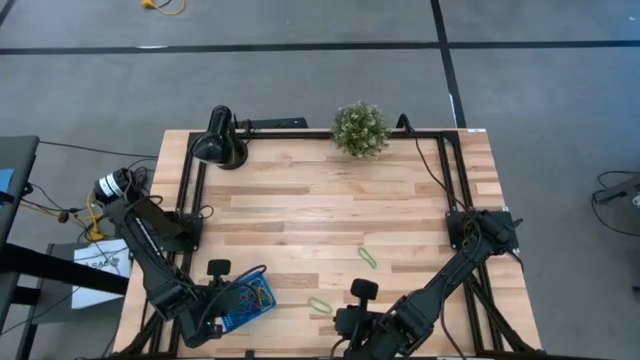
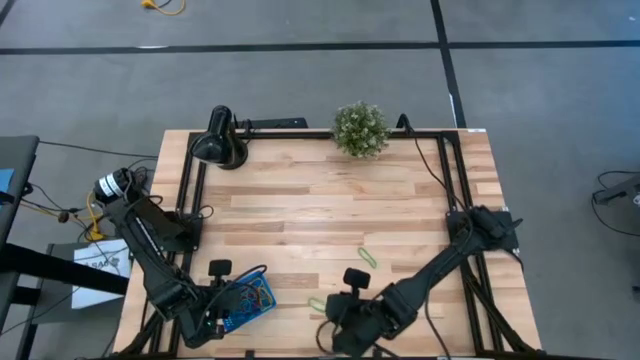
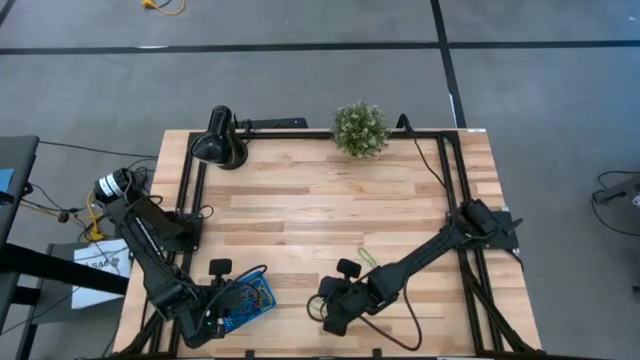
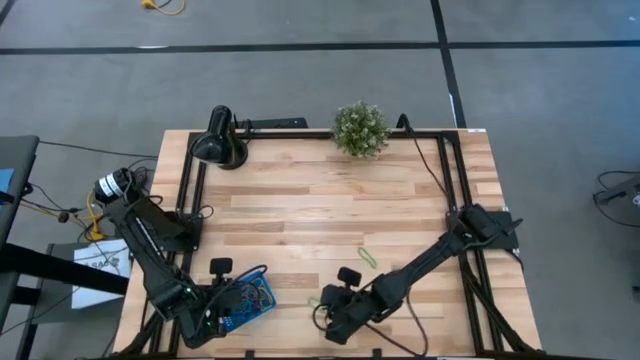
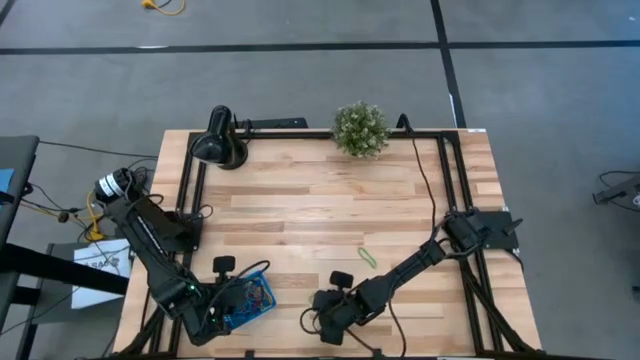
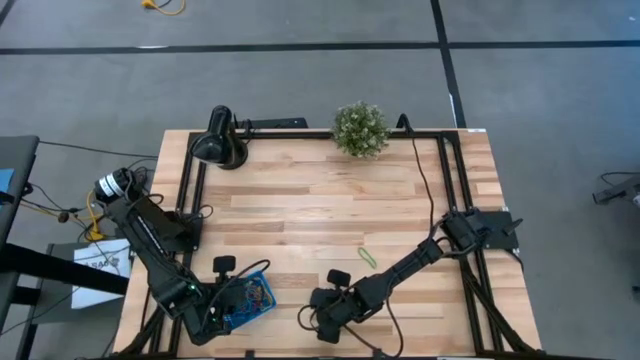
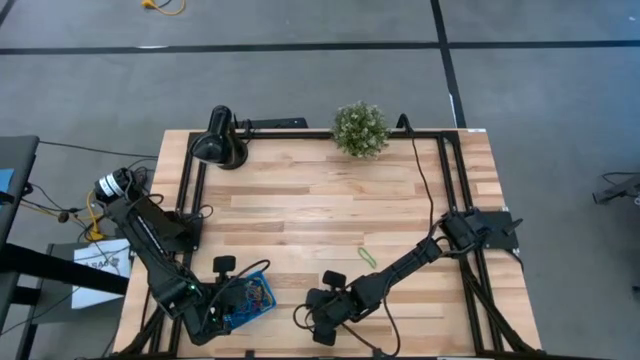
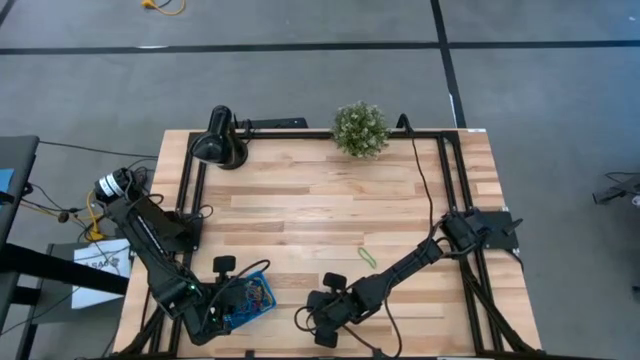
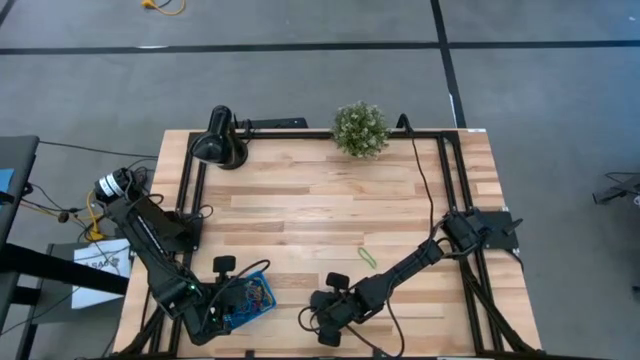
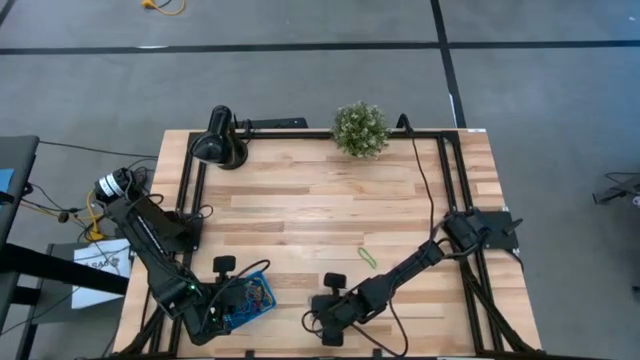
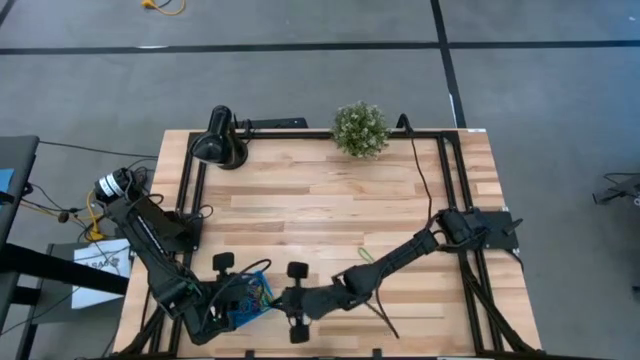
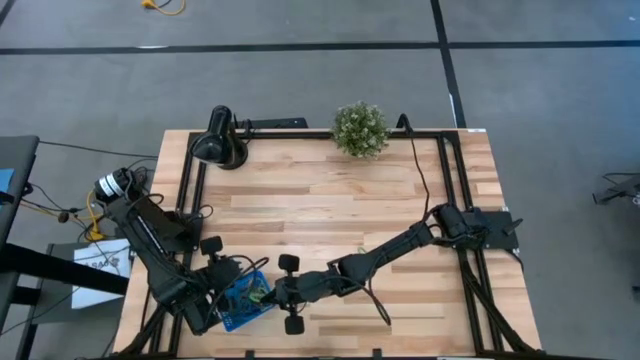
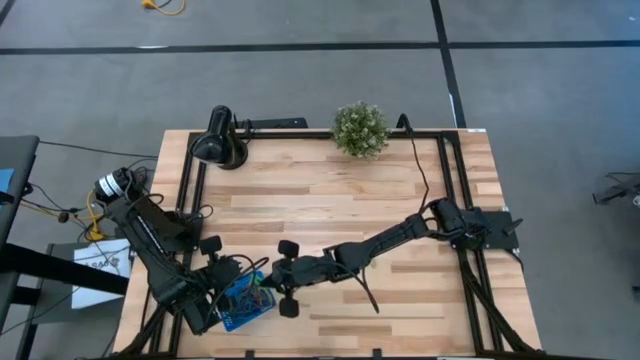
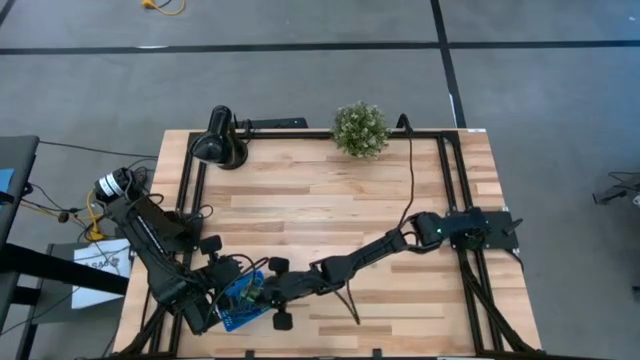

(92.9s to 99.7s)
Task: Pick and place rubber bands into bin
Put the bottom green rubber band into the blue basket

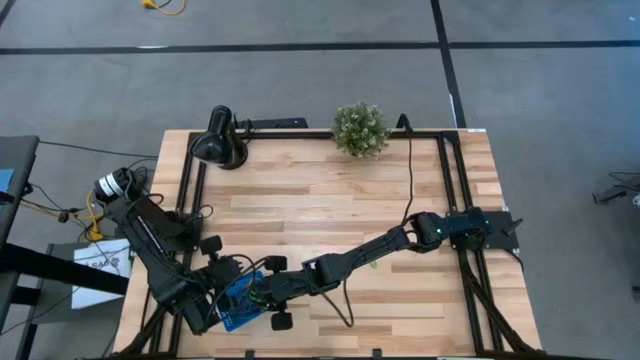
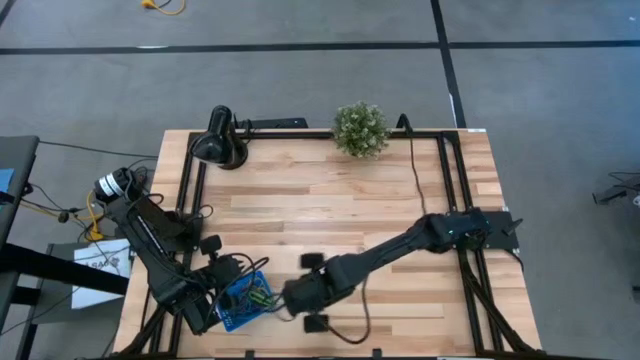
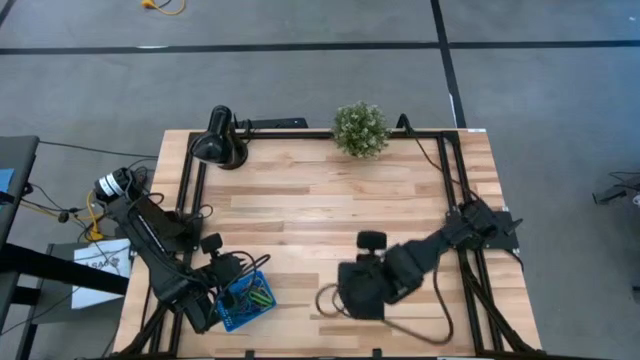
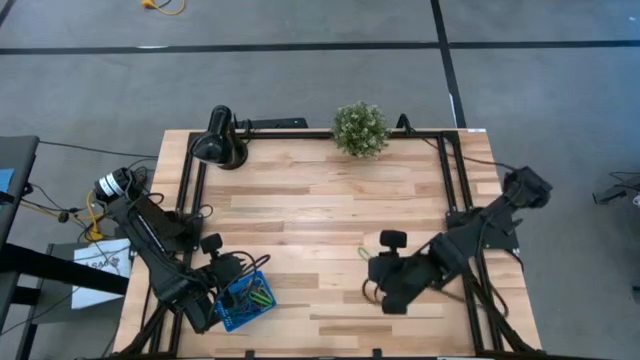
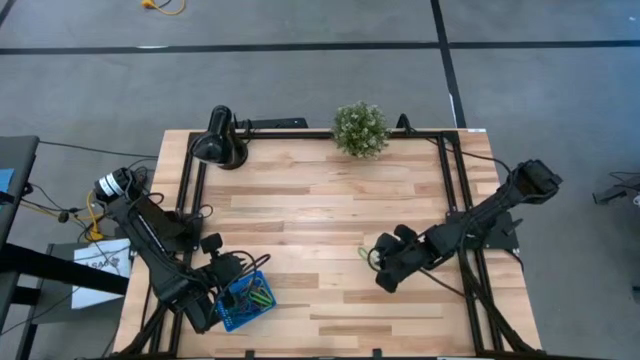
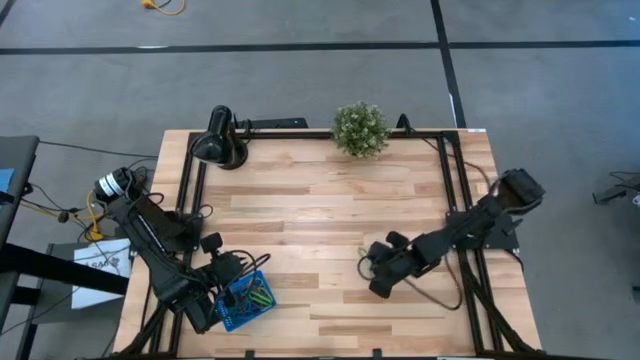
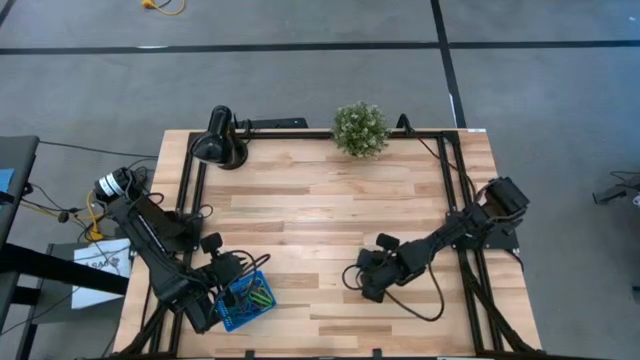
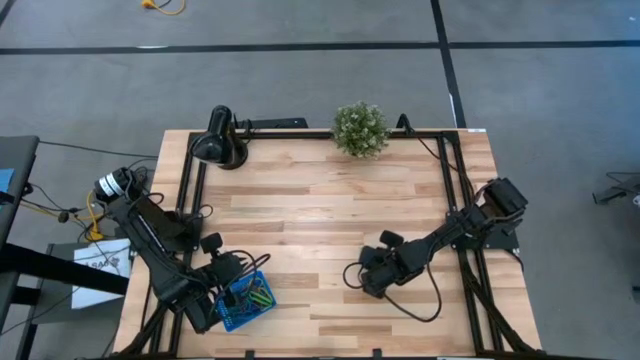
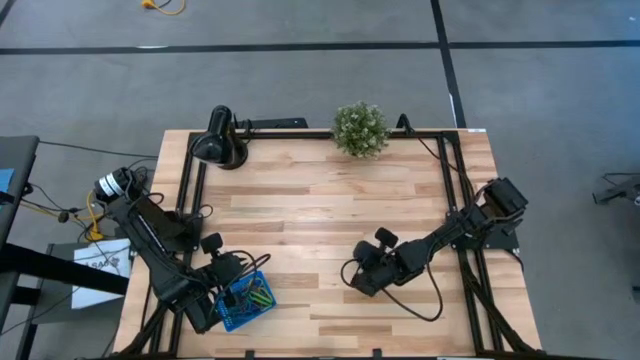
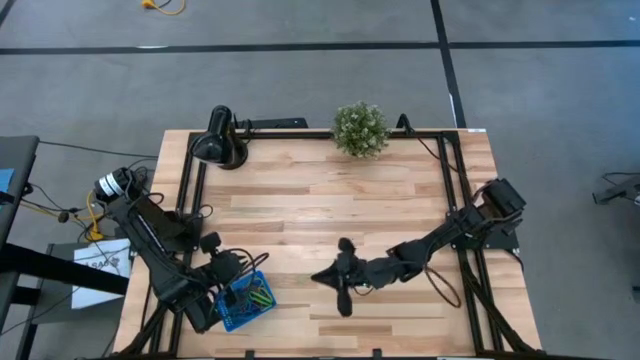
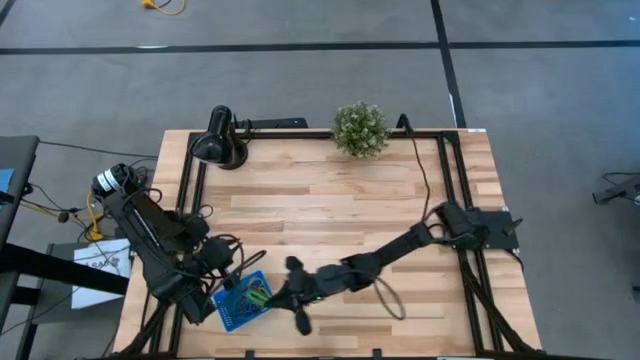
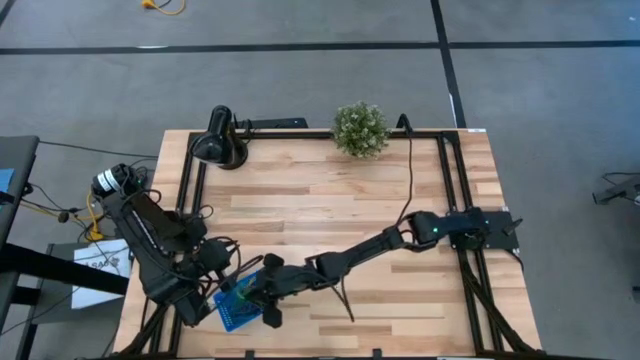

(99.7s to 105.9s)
Put the green rubber band into the blue basket

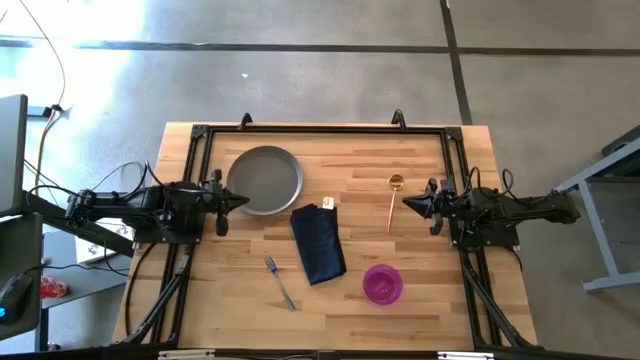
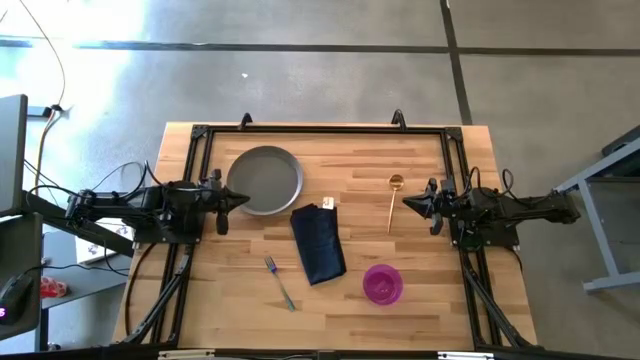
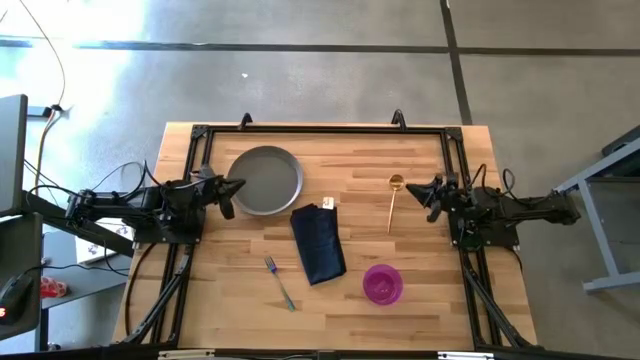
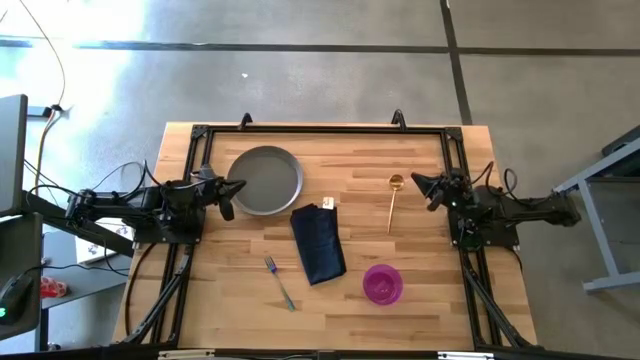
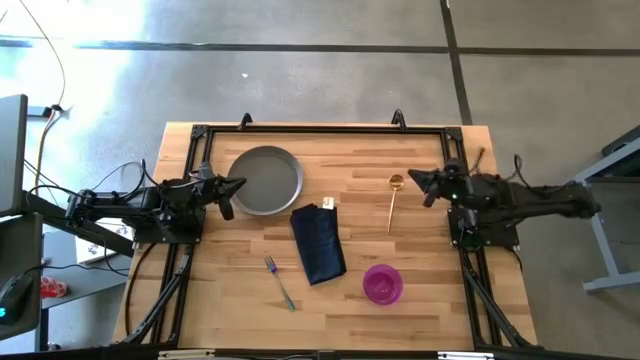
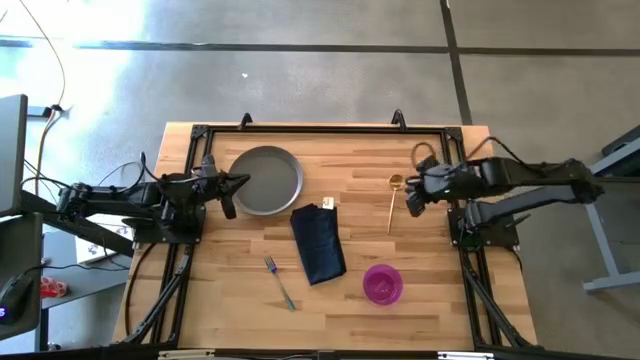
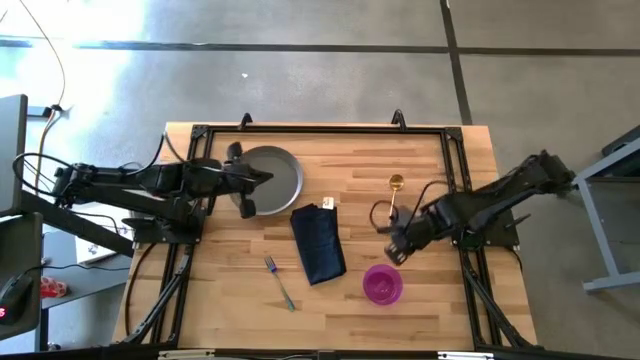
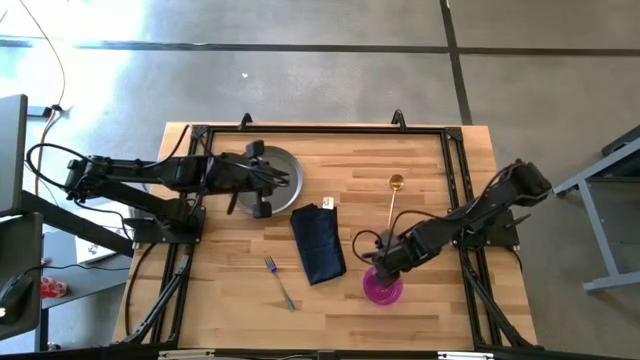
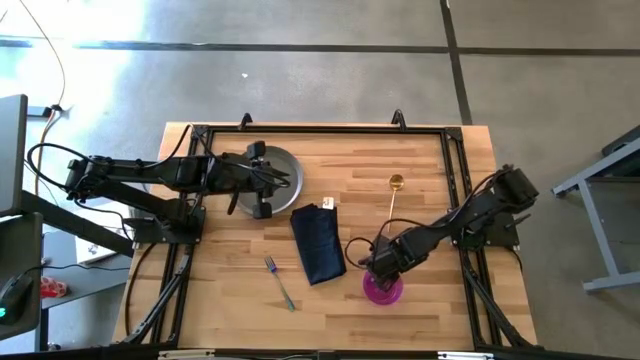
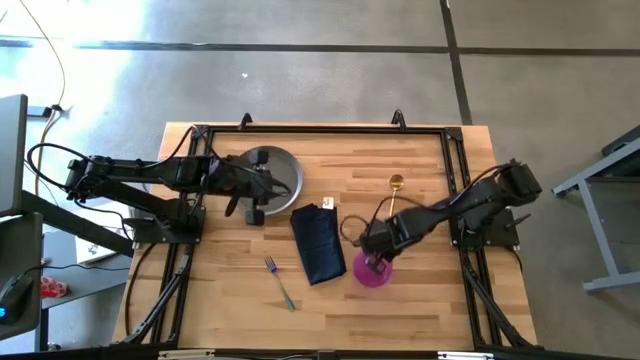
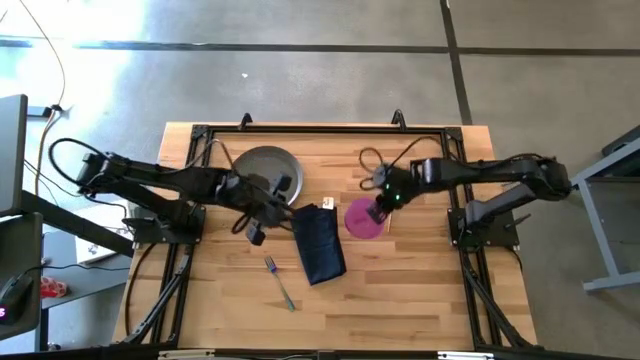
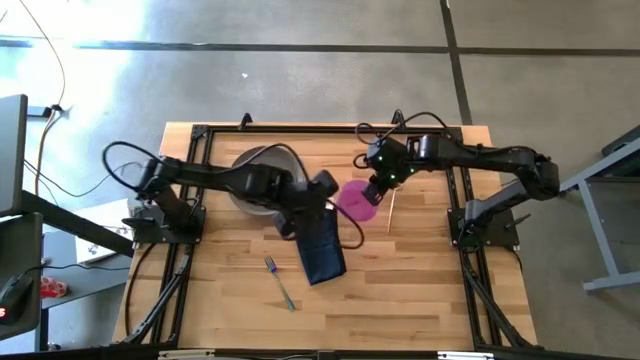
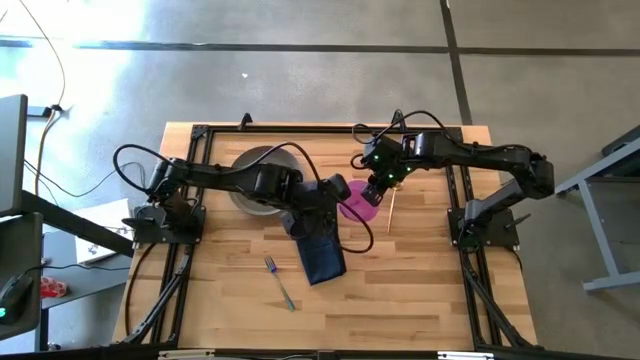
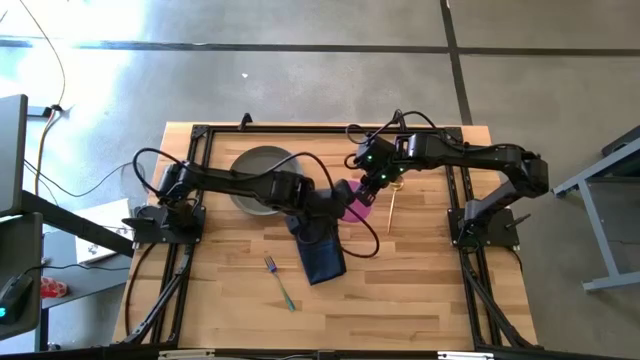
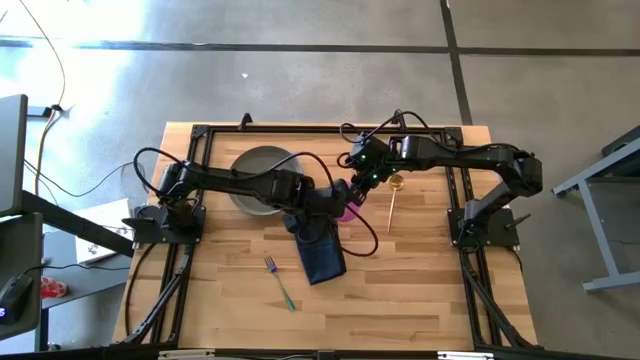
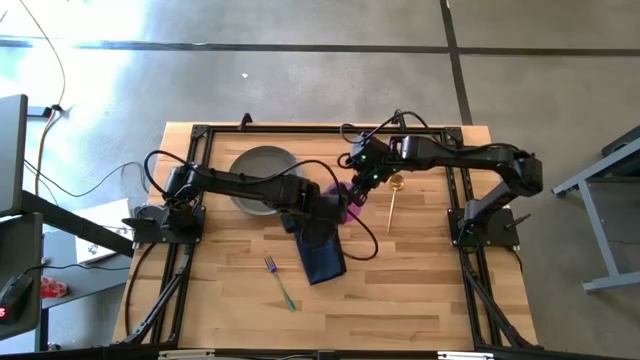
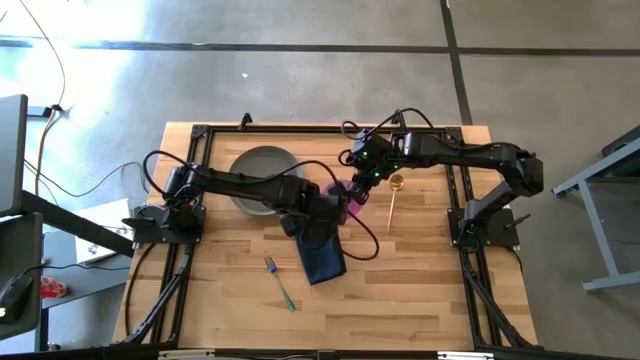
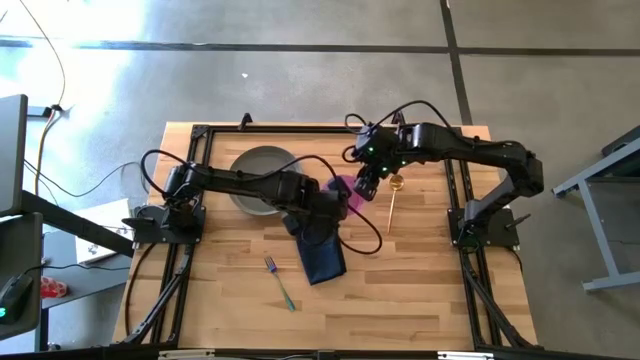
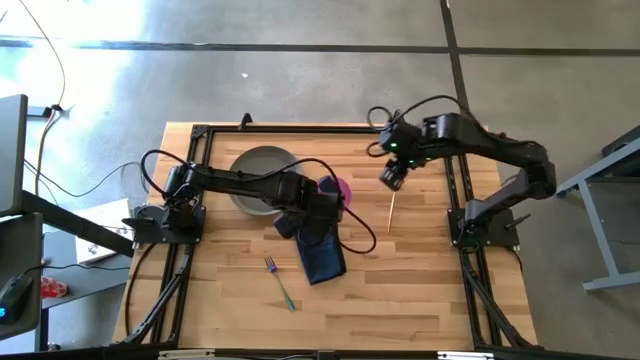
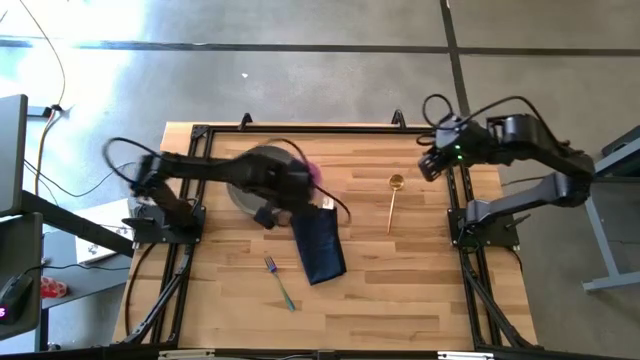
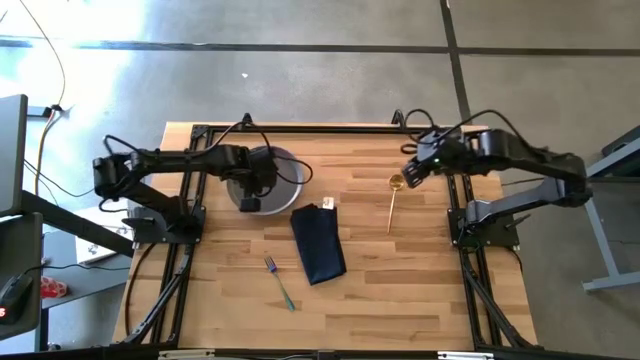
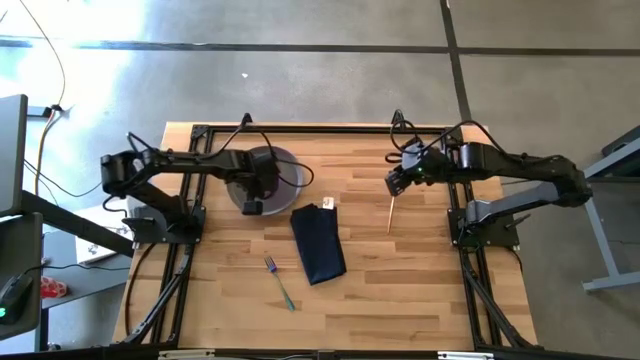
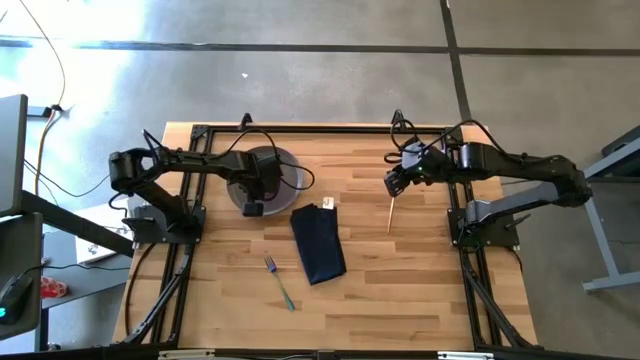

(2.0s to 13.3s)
Task: Set table place
Put the purple bowl on the gray plate
